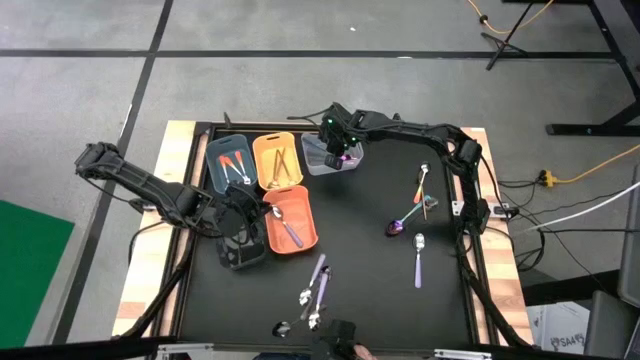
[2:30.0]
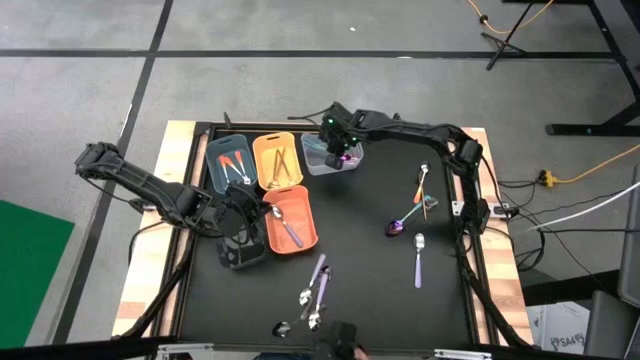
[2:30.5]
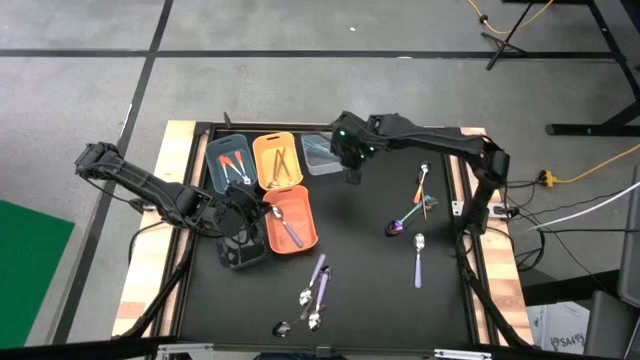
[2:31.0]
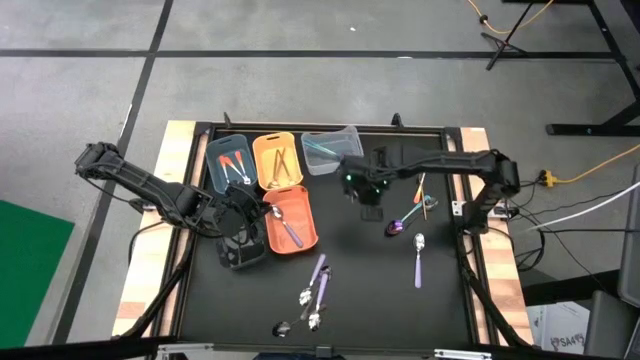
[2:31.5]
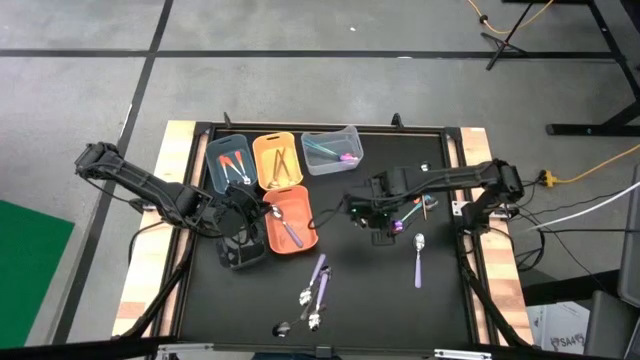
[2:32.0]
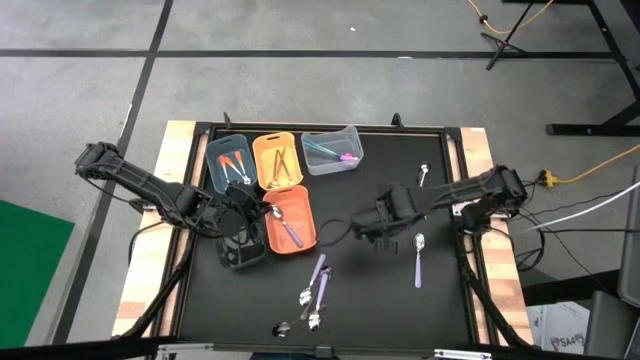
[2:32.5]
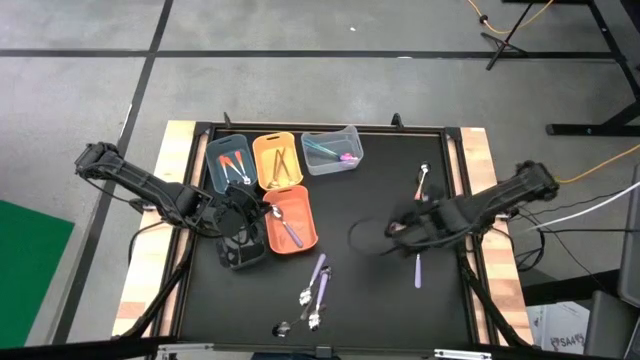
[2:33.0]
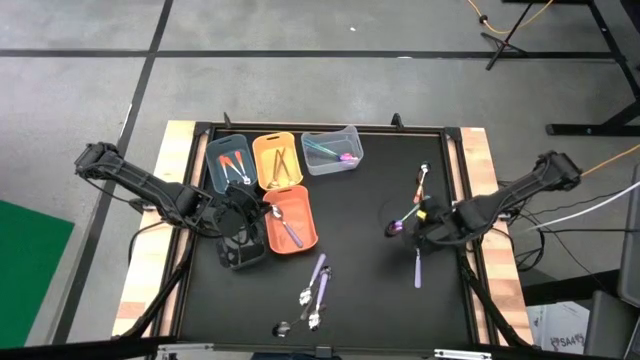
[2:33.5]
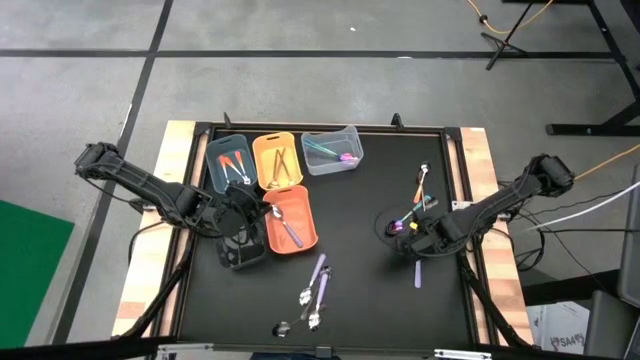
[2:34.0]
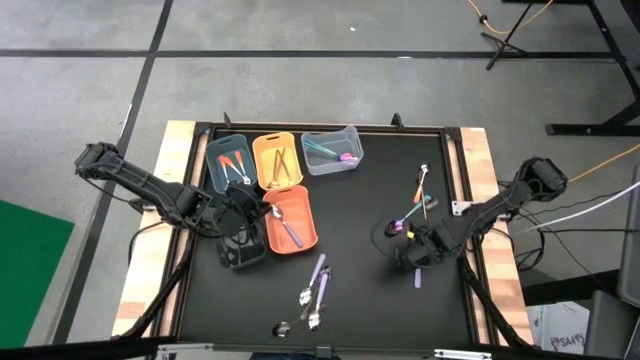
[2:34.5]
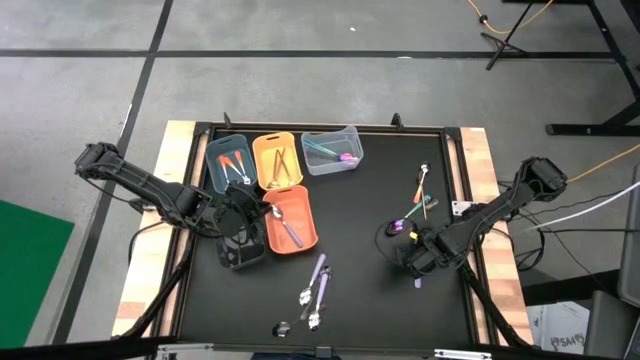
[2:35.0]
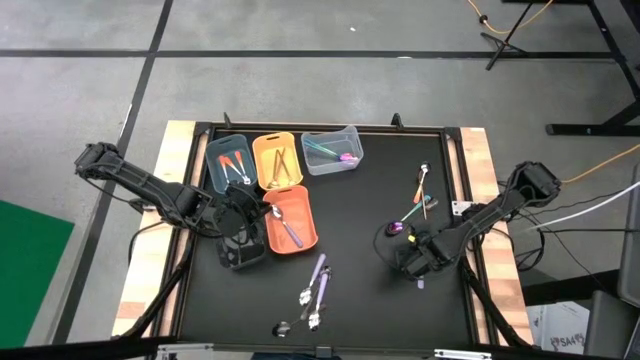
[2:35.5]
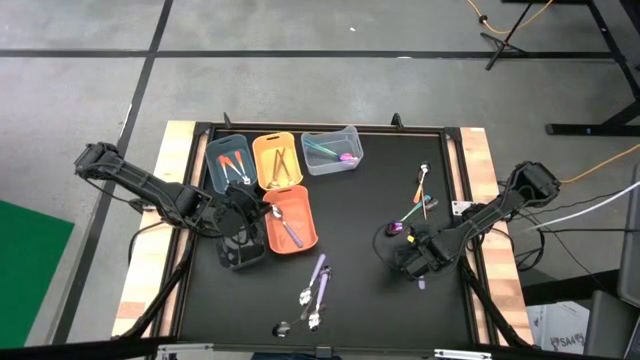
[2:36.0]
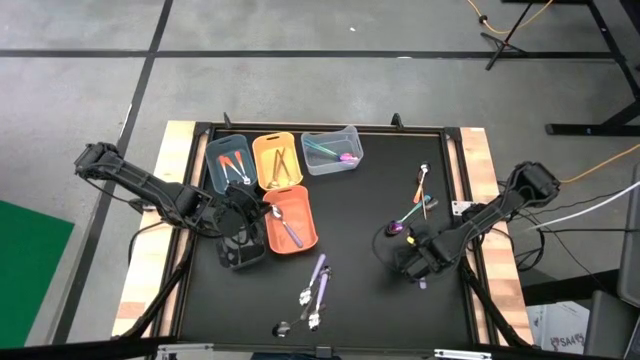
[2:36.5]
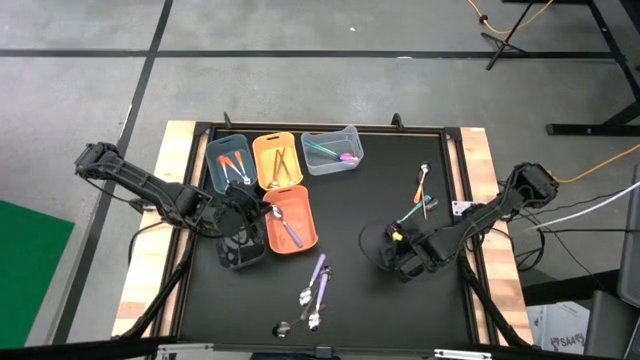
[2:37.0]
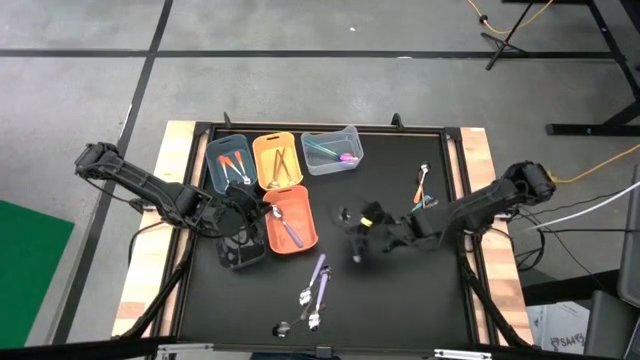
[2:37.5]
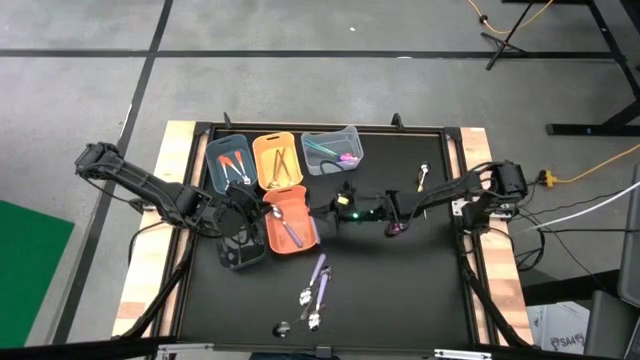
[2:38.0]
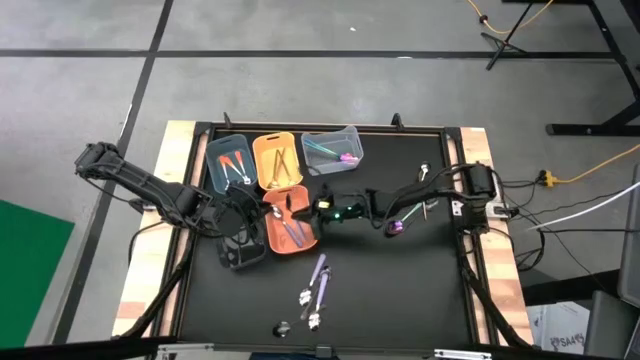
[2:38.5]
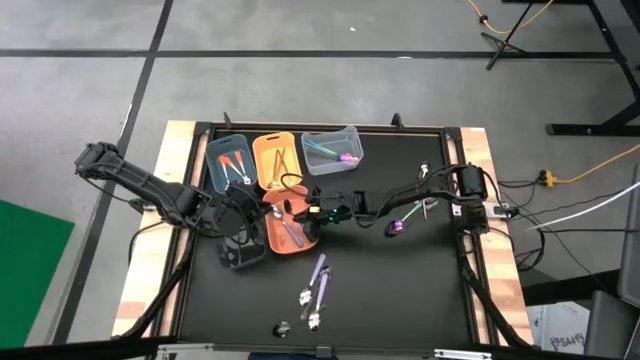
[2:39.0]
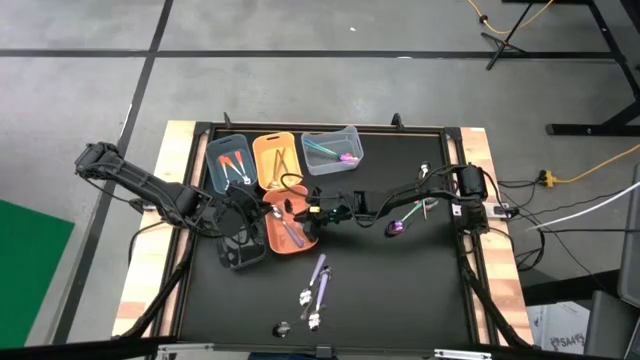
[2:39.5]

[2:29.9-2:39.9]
Task: Sort silverware by color (type)
Put the purple spoon into the orange bin

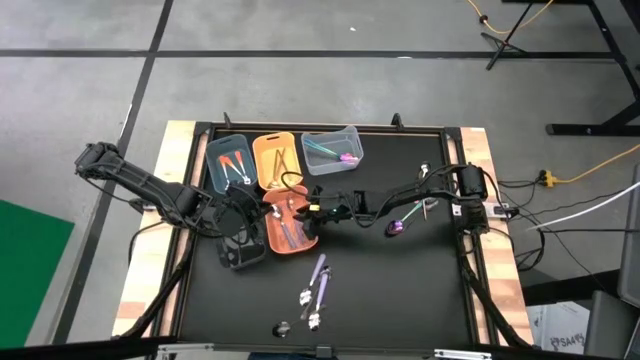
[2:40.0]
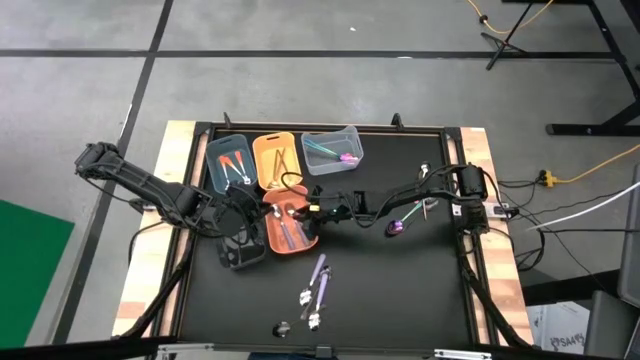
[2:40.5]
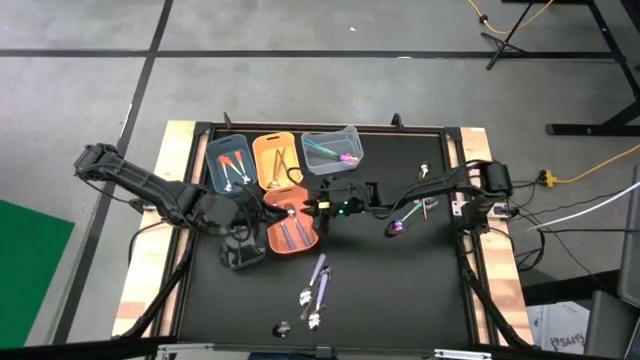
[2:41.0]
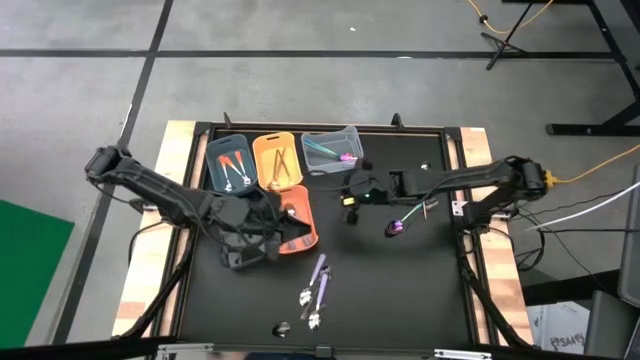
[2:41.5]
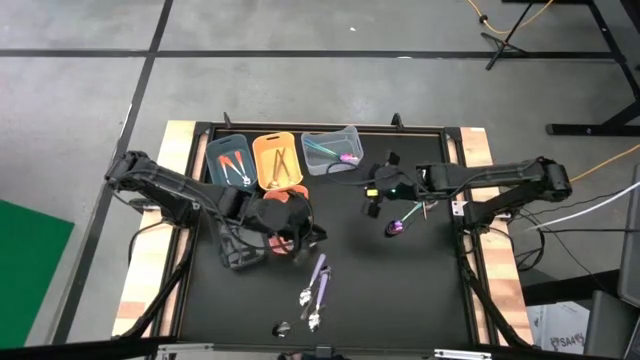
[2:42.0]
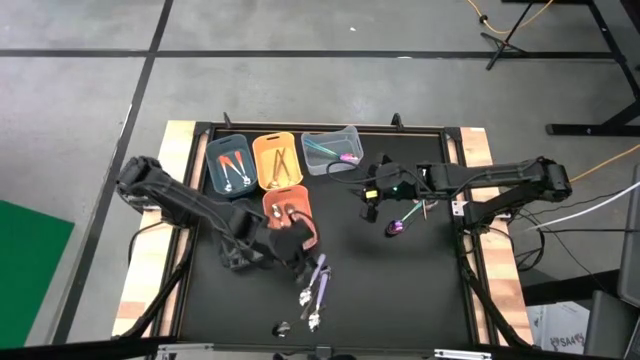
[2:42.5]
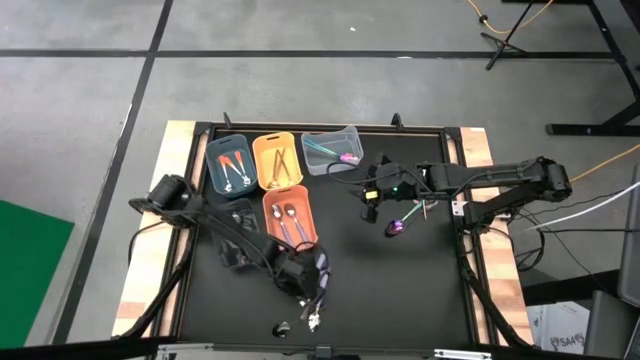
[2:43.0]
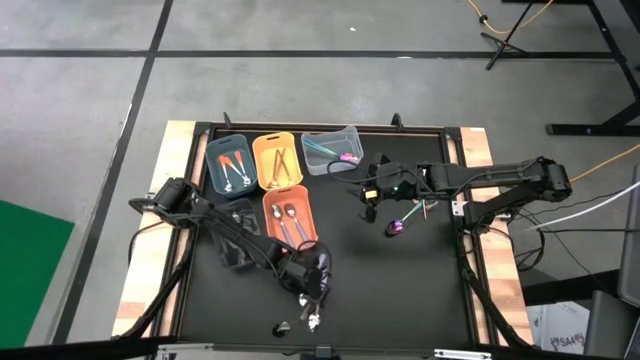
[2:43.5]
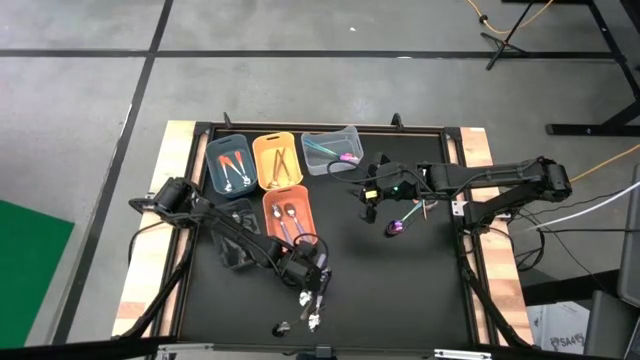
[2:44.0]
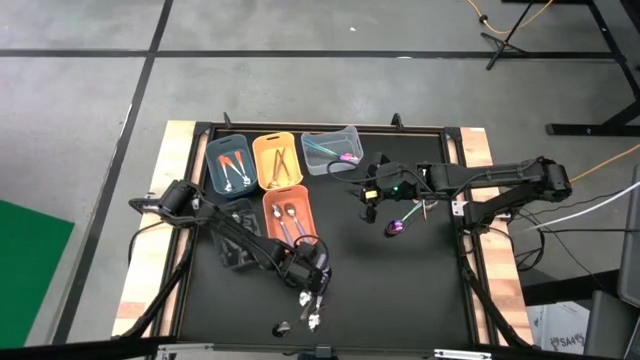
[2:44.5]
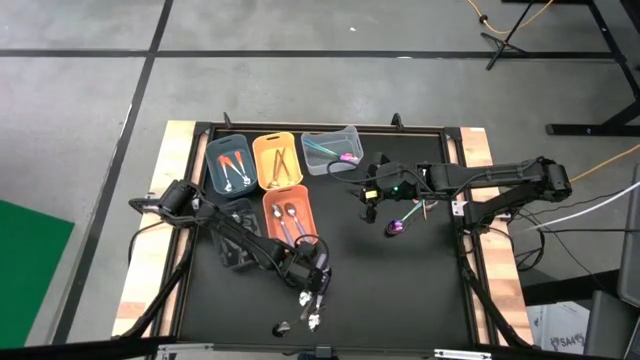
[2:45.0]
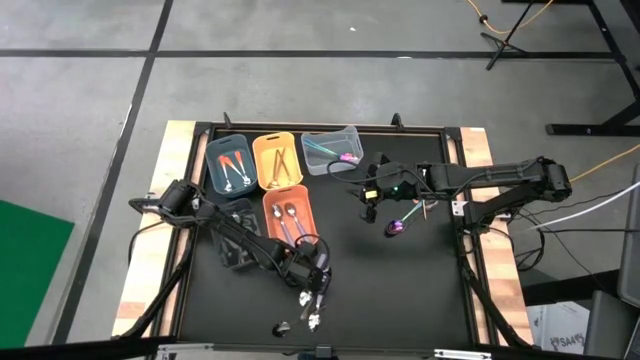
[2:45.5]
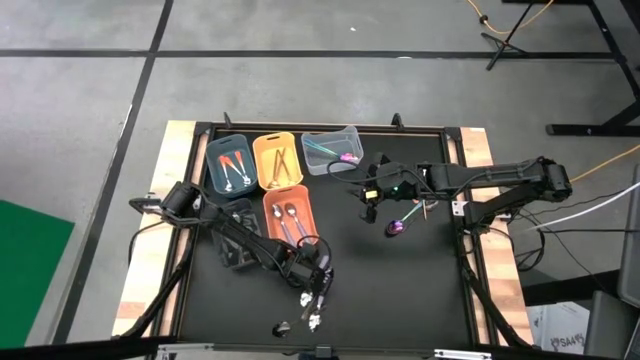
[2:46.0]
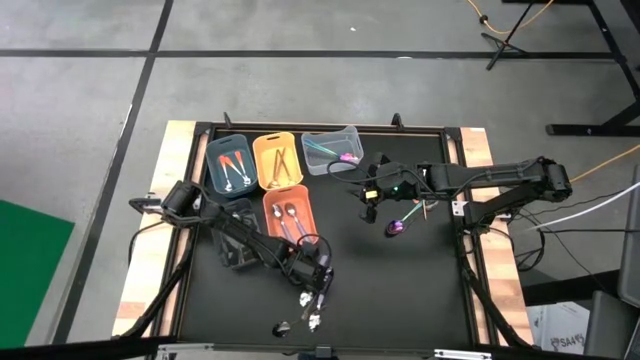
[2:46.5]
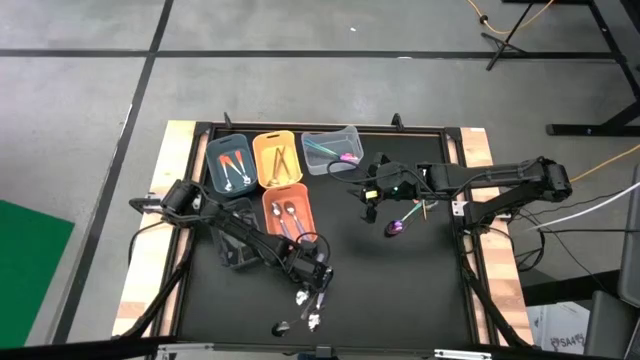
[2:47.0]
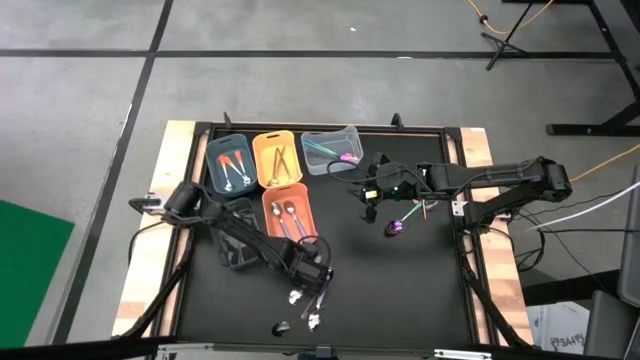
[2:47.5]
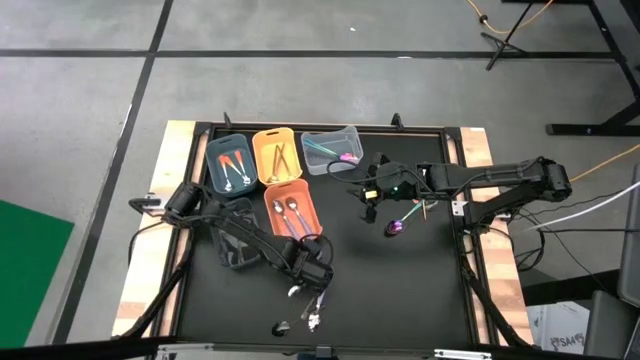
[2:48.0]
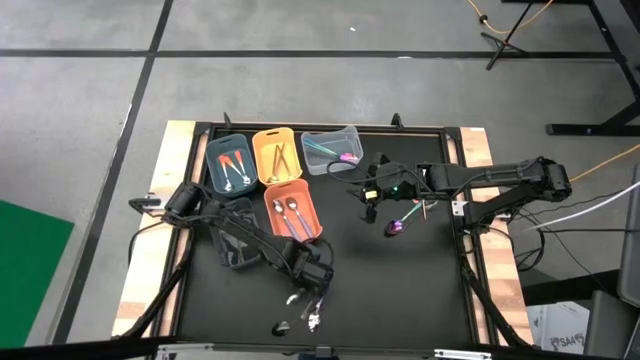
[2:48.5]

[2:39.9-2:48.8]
Put the purple spoon into the orange bin
